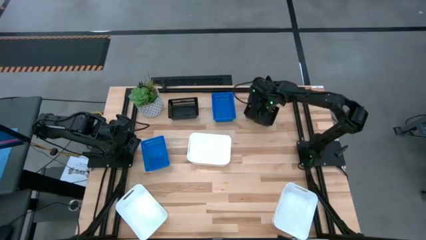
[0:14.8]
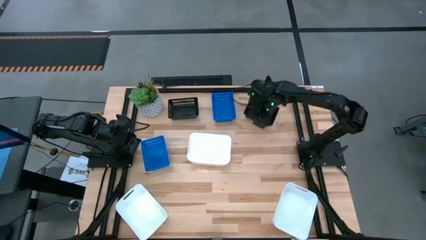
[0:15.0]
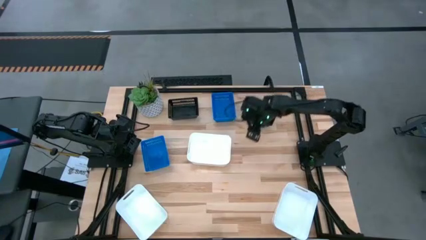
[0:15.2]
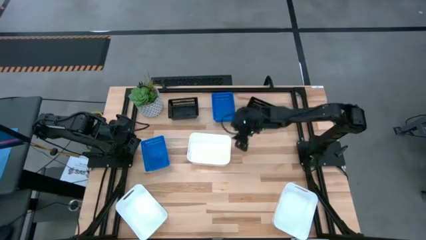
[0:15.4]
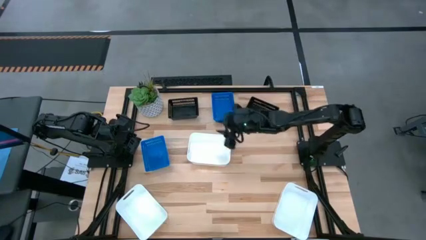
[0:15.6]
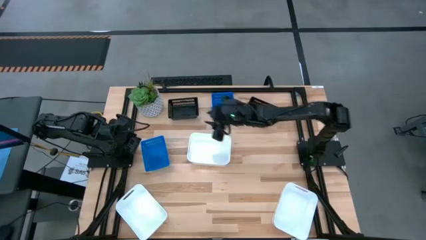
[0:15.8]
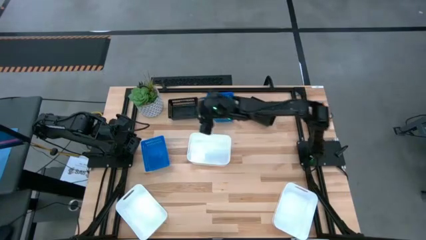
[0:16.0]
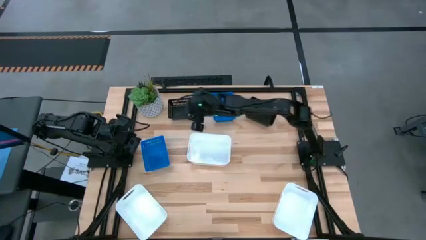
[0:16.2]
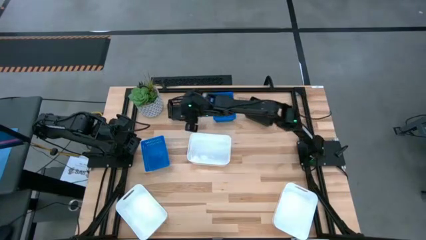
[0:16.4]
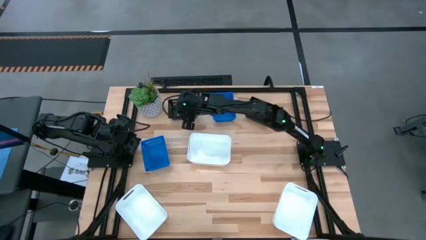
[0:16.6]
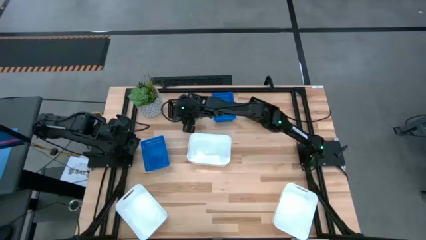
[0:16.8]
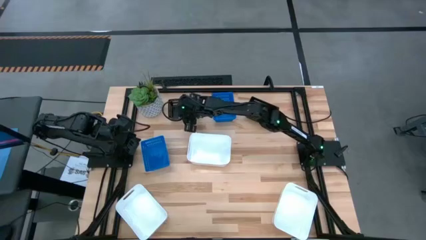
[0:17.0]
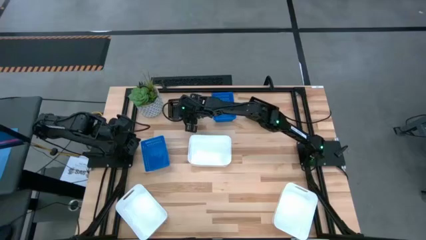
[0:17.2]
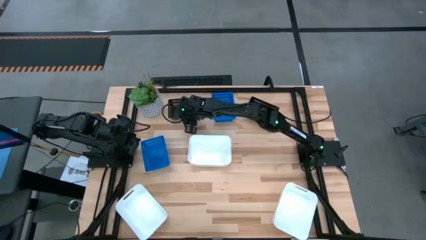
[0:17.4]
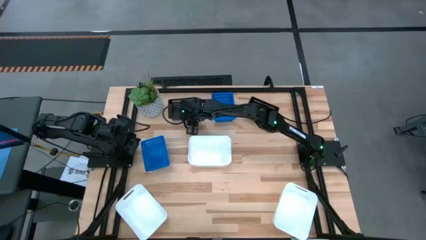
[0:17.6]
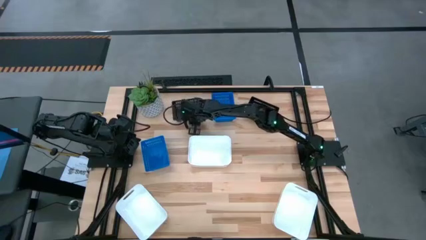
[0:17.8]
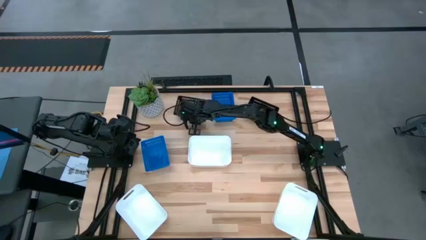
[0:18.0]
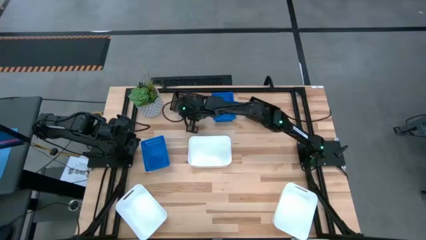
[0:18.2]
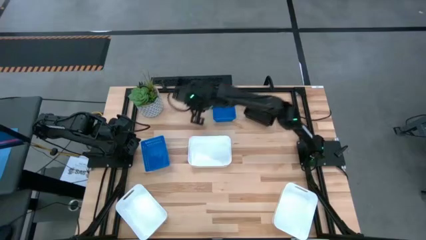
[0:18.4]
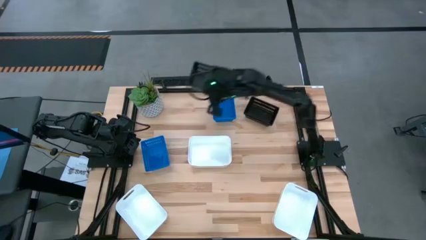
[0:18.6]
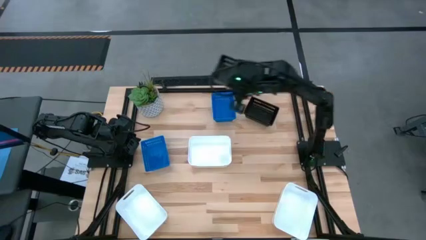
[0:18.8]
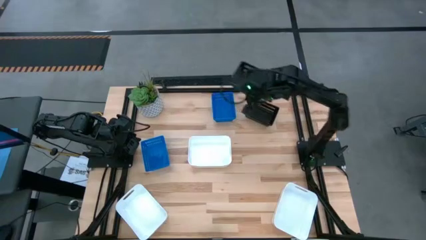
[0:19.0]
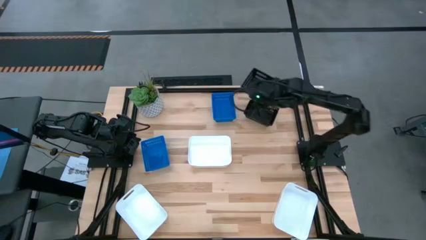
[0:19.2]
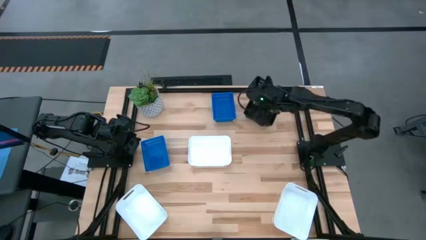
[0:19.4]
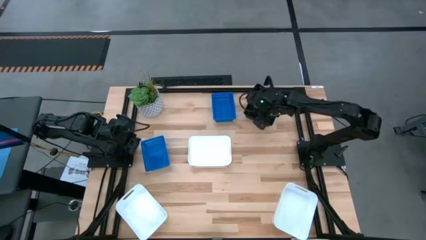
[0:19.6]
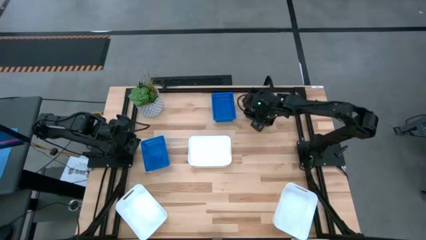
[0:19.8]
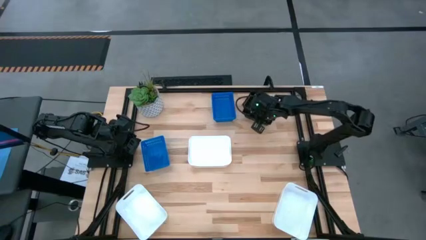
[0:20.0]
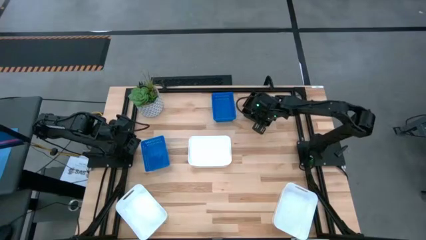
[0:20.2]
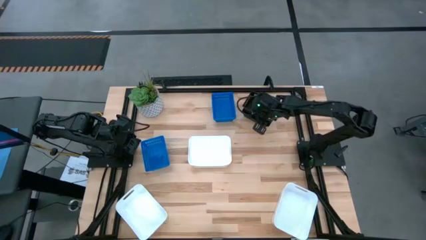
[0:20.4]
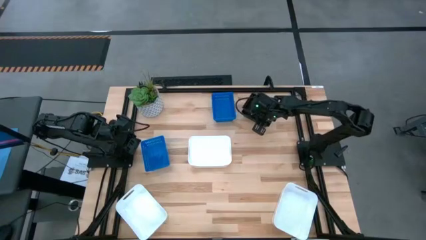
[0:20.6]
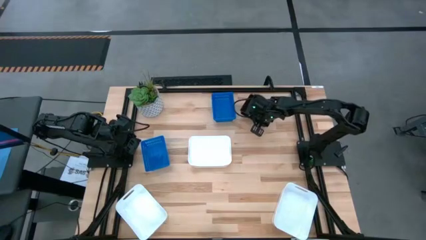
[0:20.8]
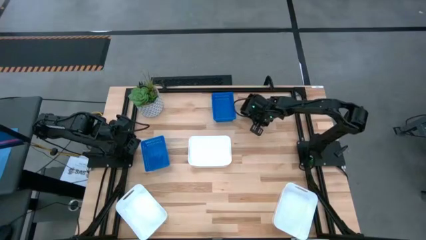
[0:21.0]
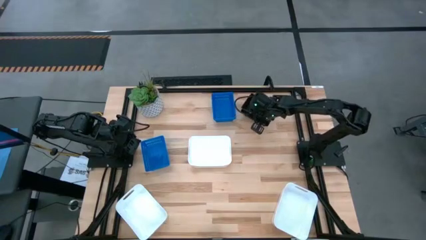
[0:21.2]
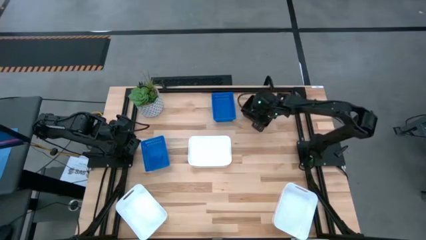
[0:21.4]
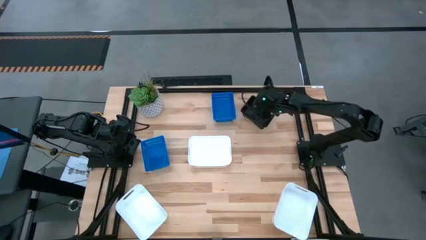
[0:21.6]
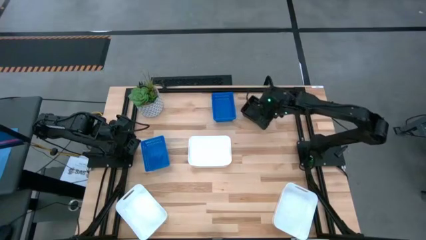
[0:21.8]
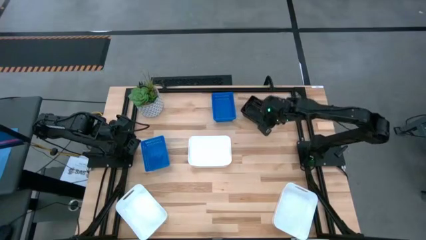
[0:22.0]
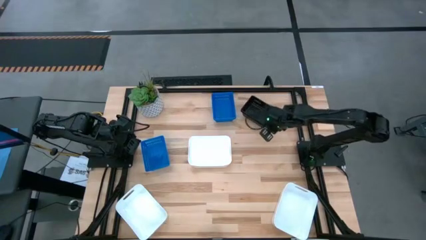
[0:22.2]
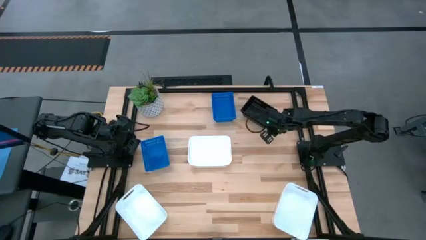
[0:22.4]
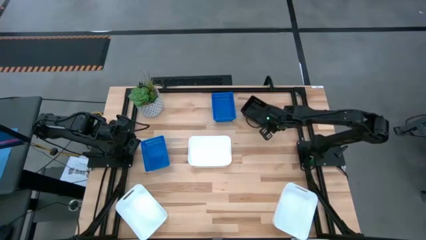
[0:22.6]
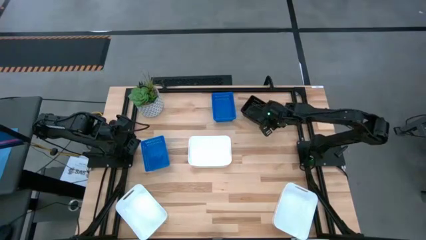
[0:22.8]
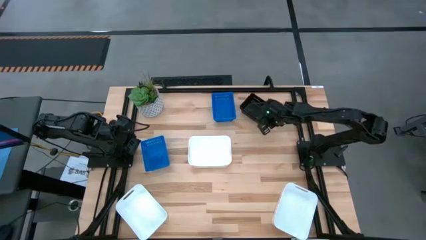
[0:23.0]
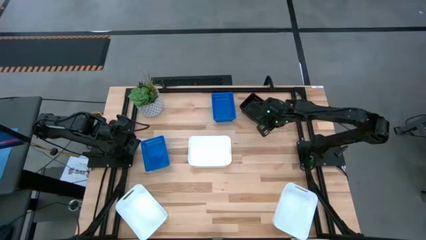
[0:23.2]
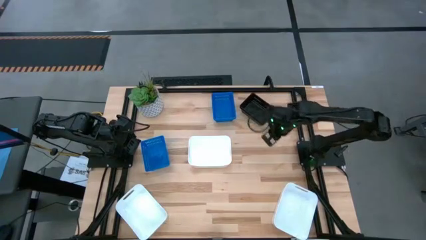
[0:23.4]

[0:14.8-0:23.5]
Stack the black bin on top of the stacked black bins

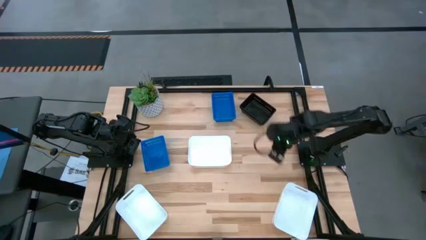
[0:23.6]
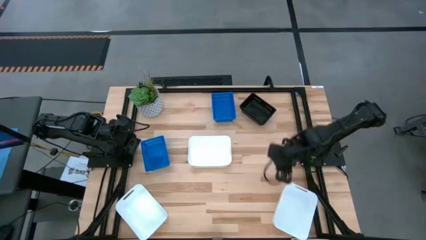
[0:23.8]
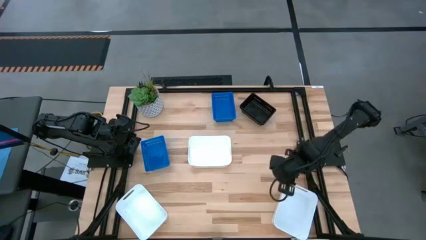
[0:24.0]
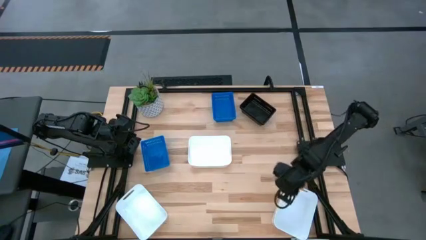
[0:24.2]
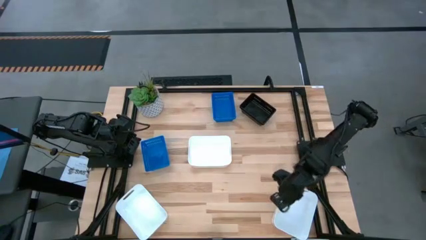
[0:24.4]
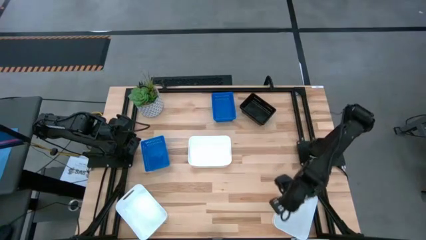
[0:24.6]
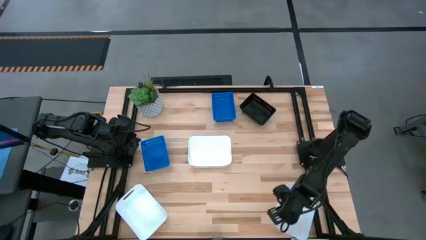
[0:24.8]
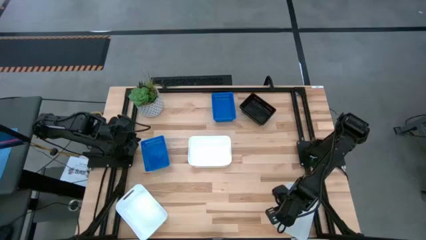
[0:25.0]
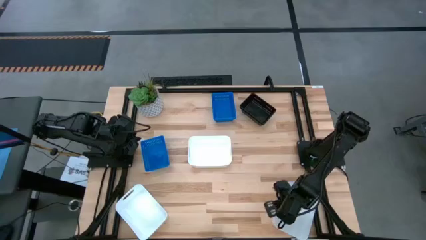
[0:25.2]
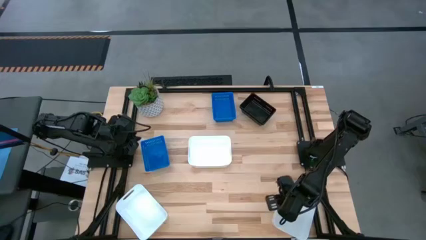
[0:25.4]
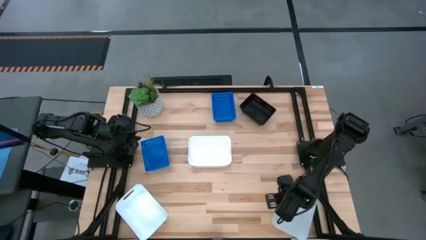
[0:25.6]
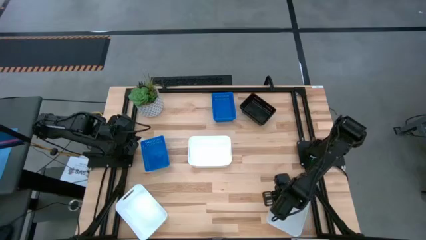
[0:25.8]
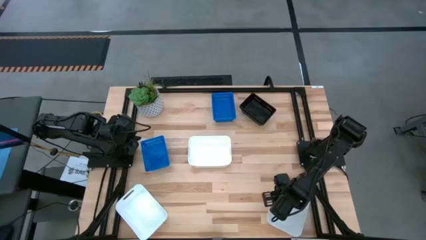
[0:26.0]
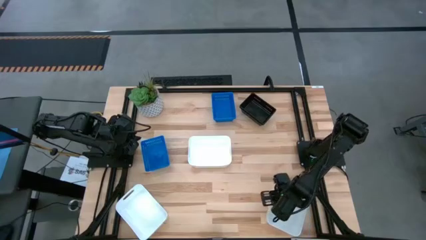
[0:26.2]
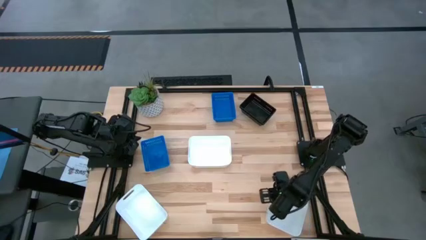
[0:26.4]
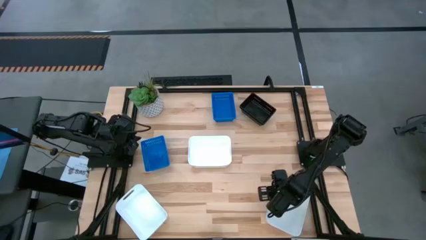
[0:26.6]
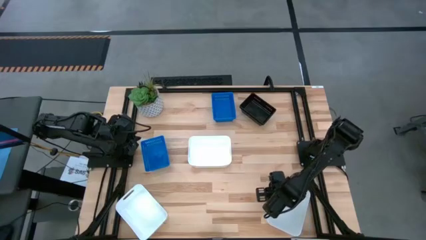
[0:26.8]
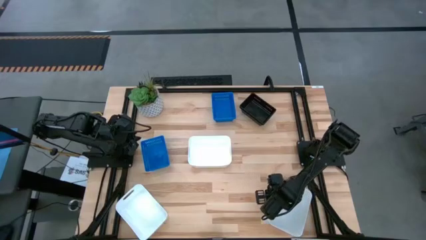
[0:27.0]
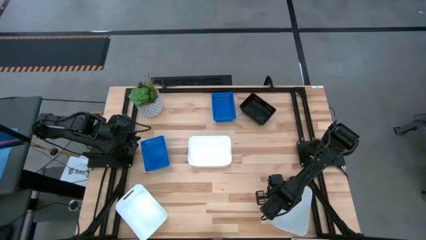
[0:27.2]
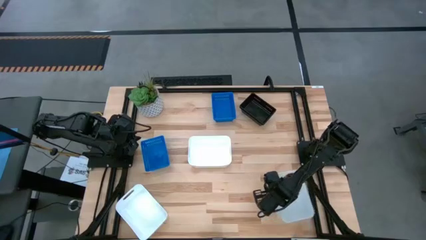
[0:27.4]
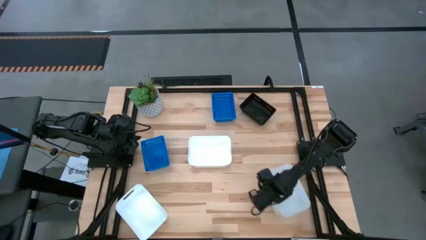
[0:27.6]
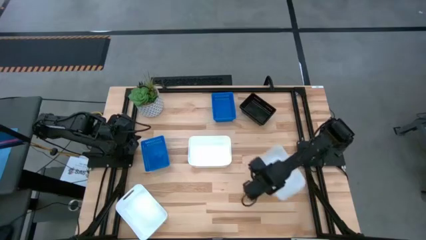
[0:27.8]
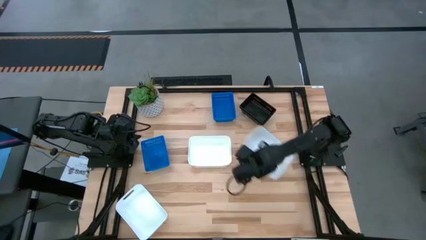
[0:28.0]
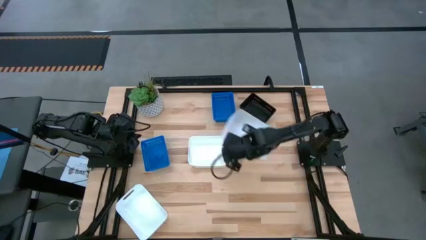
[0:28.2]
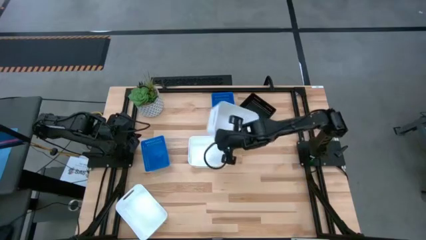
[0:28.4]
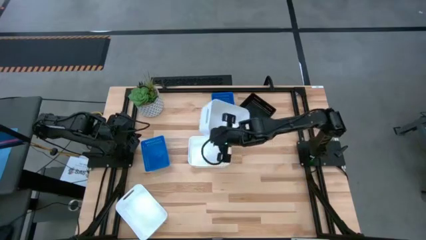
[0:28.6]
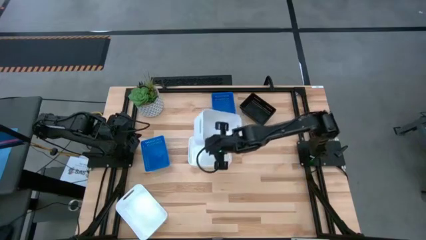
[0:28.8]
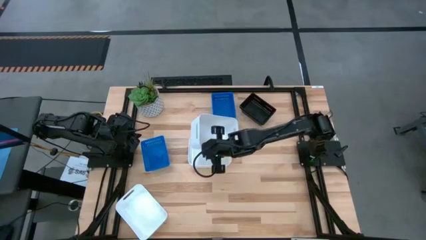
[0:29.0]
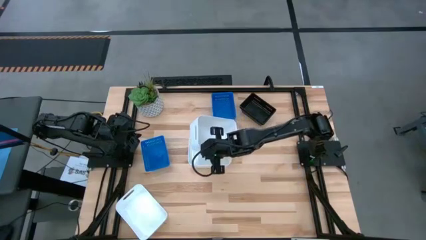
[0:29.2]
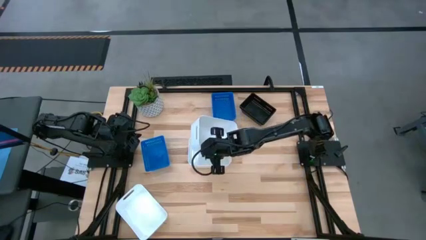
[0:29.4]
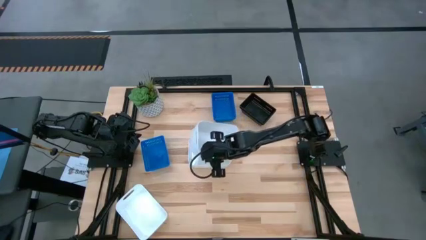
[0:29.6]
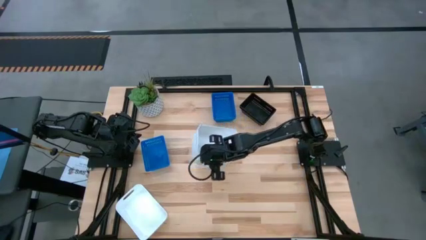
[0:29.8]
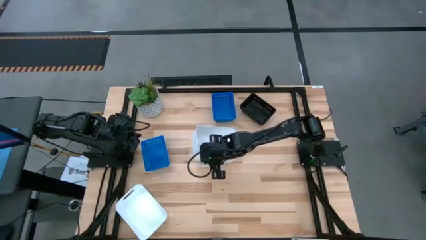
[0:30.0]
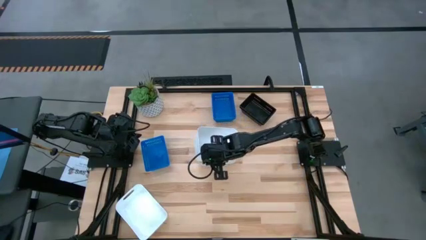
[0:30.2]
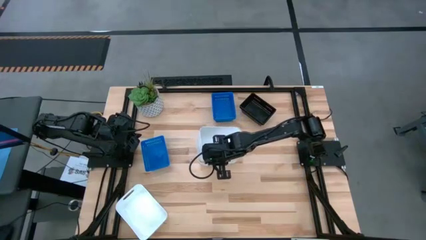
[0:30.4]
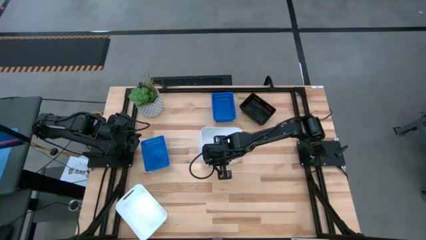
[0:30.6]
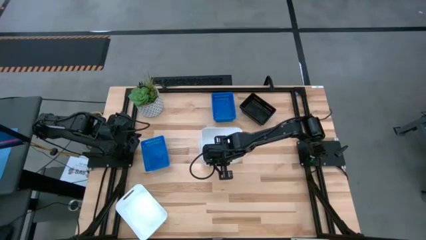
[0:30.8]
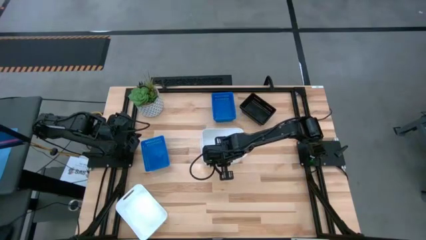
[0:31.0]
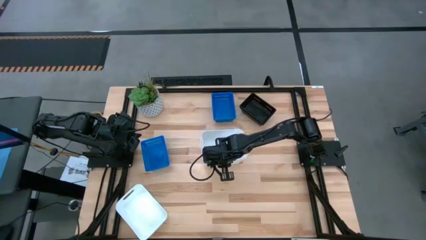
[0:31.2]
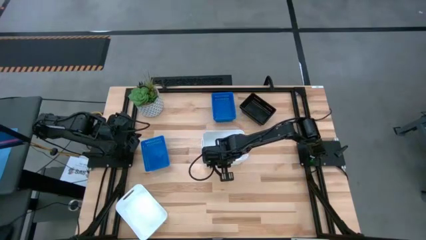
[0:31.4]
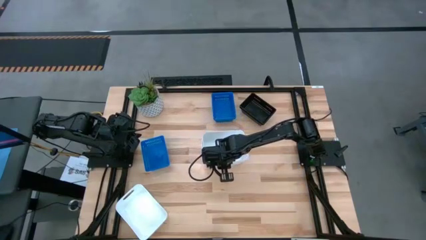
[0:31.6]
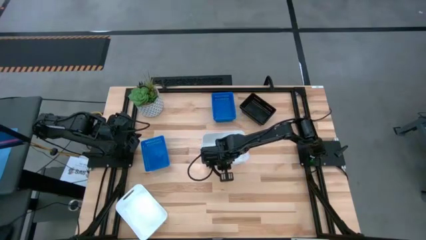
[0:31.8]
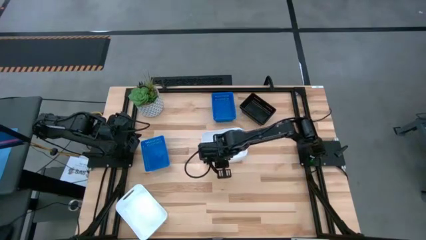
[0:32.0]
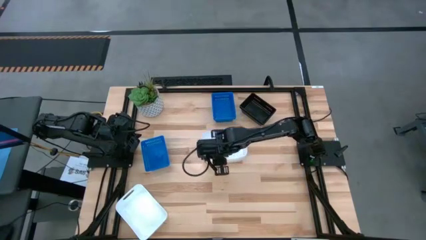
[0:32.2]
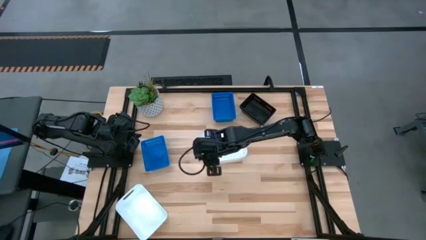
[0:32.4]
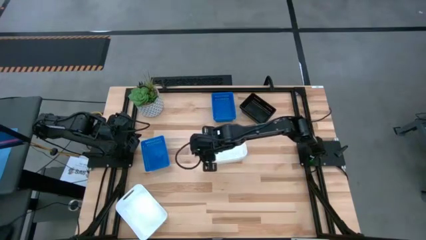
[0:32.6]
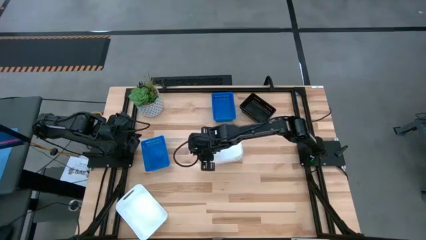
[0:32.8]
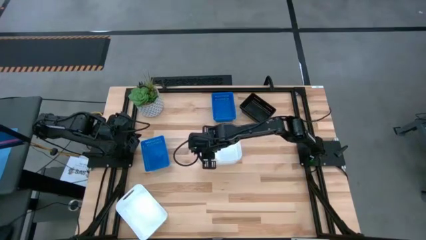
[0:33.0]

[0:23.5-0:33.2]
Stack the bottom right white bin on top of the top white bin
